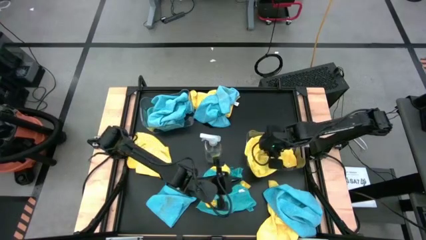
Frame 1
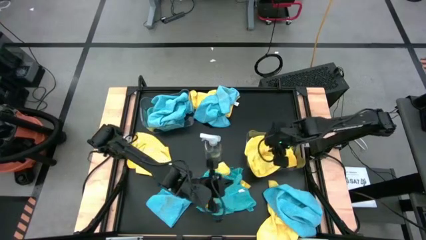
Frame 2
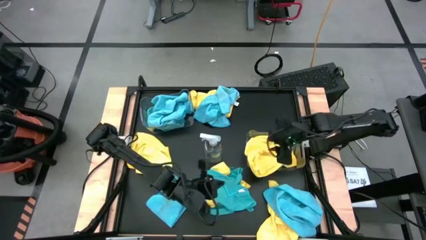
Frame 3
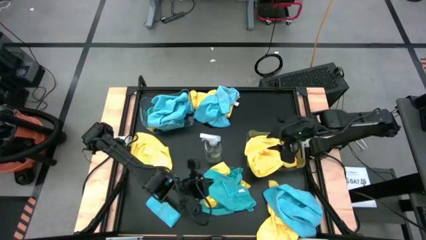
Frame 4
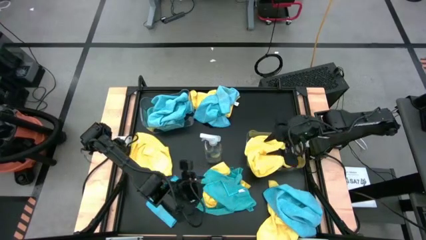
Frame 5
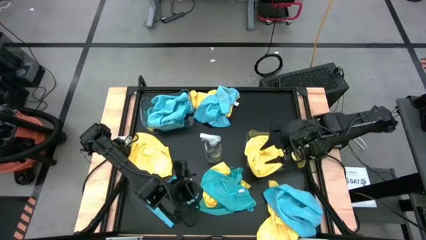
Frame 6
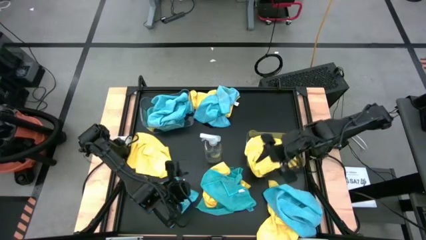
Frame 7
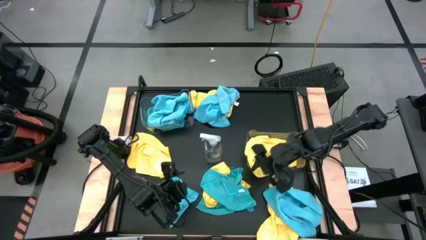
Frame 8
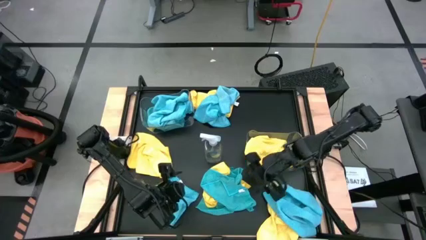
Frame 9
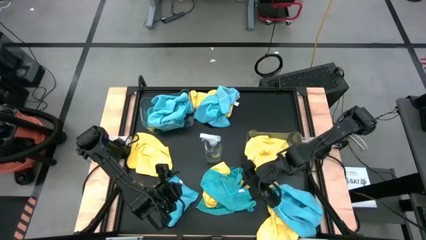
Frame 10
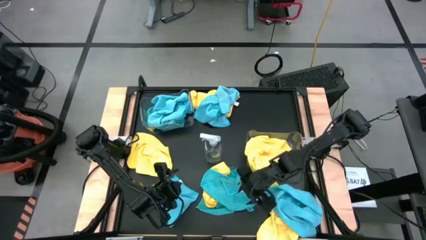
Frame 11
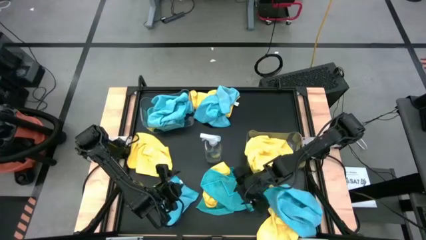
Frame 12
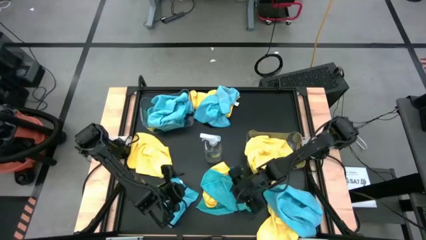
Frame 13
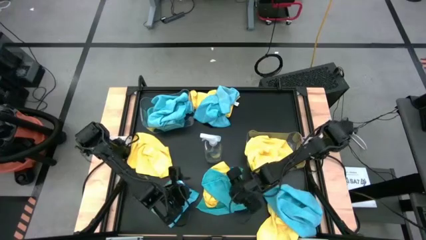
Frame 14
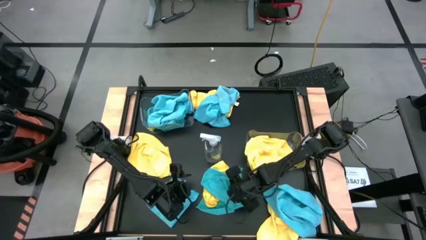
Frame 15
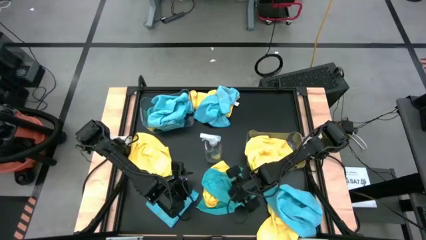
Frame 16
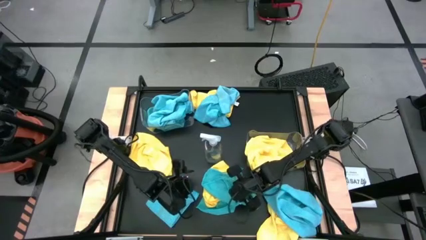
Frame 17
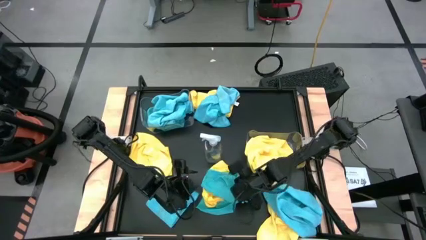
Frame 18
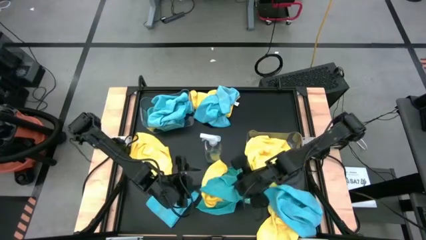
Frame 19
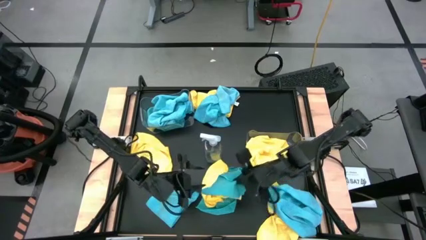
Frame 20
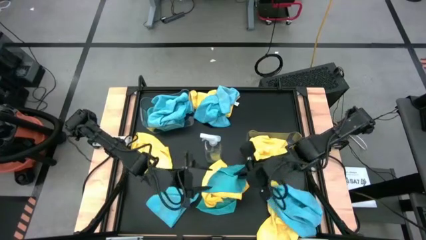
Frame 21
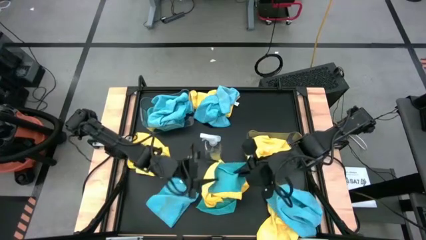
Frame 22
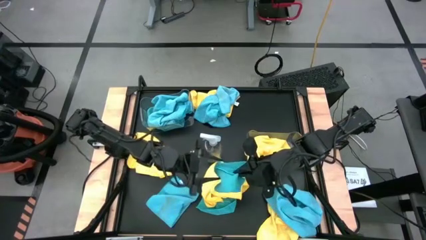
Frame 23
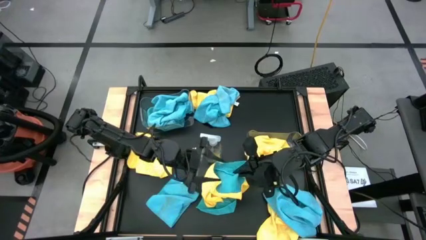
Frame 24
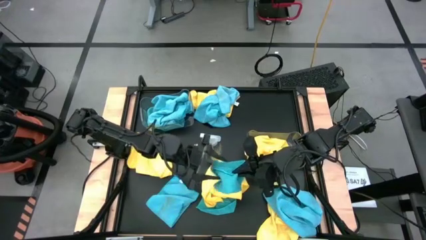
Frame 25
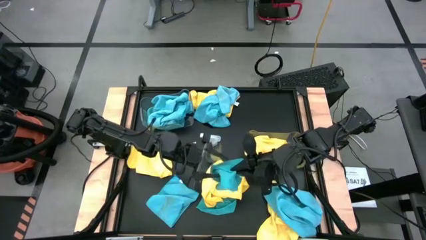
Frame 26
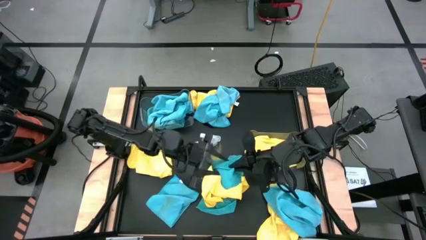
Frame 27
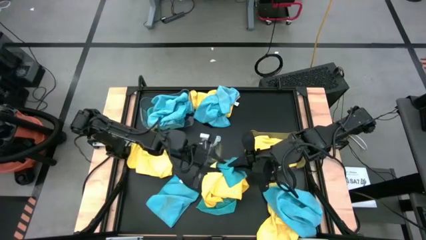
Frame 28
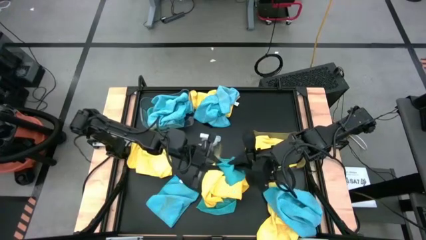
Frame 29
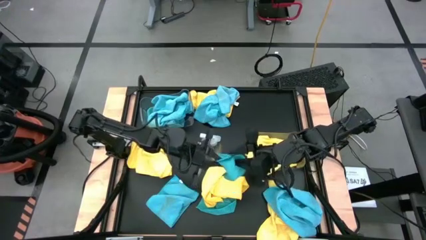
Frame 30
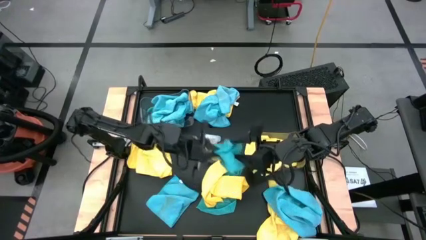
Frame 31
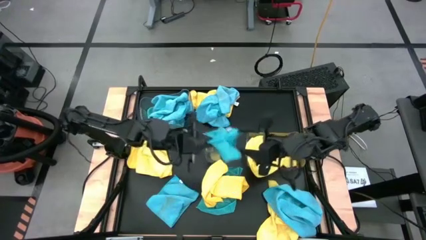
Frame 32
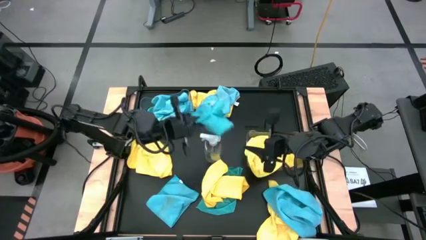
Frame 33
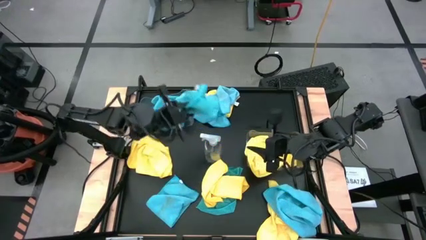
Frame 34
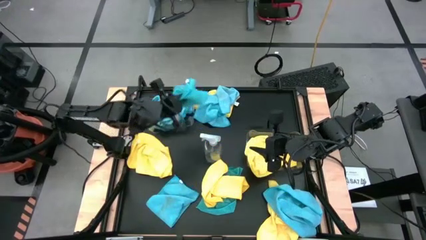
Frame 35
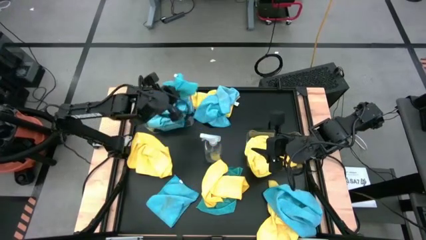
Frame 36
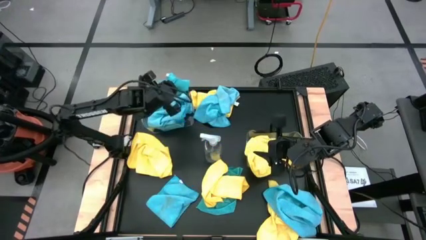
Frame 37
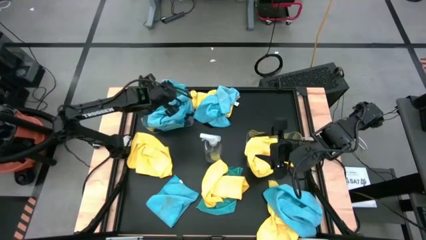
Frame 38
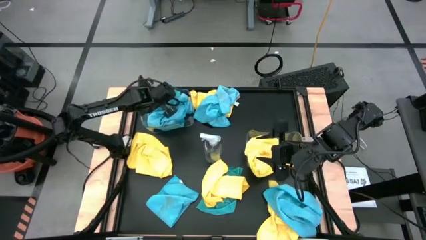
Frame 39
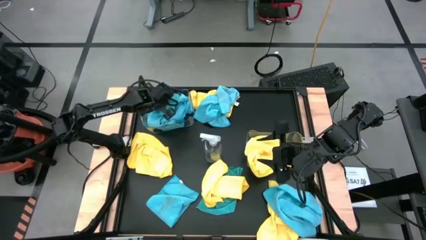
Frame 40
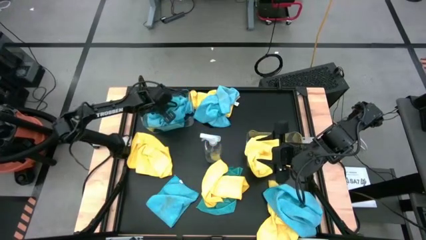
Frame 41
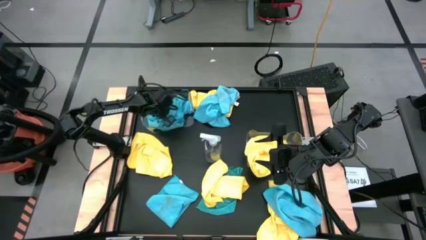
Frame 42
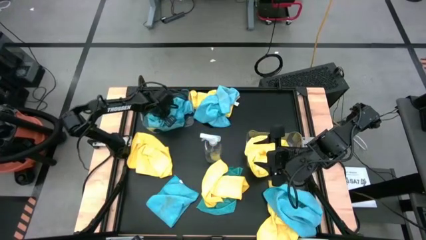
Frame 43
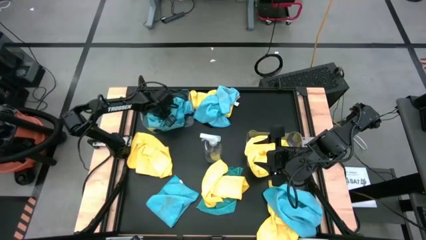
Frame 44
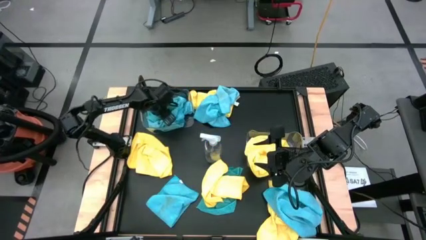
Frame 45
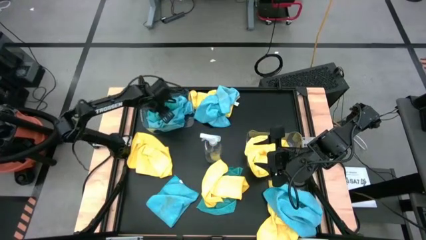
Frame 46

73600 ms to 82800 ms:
Task: Sort microfiber towel by color & place in baskets
Put the blue microfiber towel into the top transparent bin

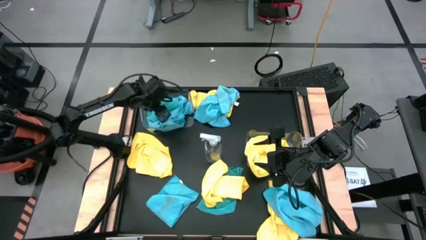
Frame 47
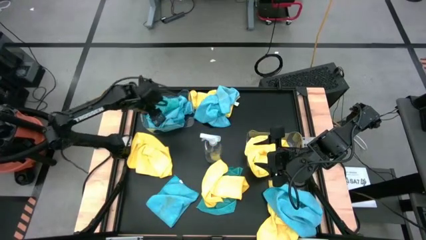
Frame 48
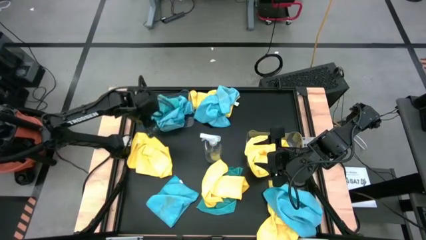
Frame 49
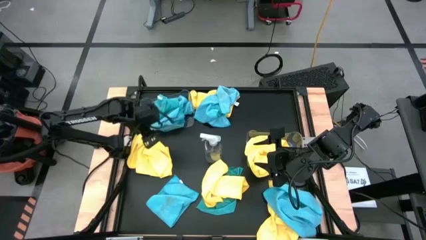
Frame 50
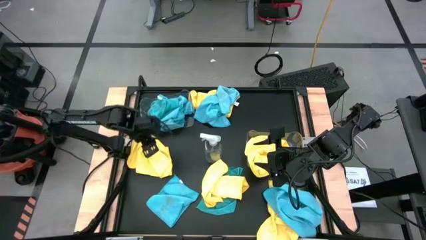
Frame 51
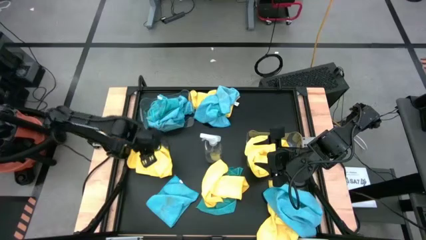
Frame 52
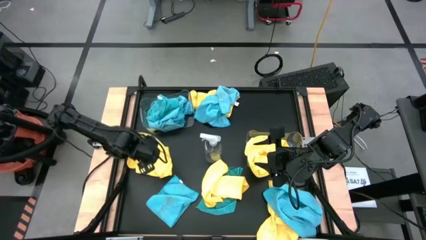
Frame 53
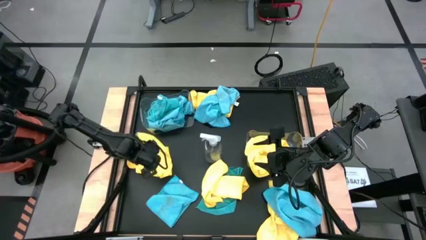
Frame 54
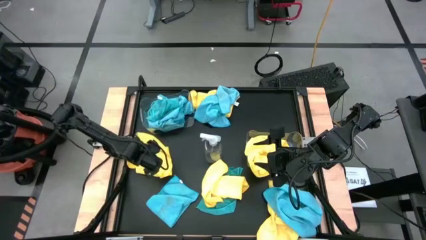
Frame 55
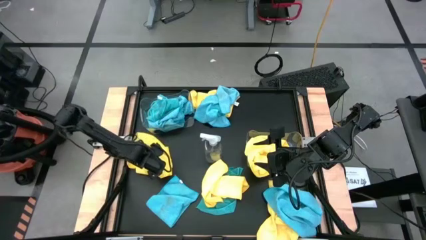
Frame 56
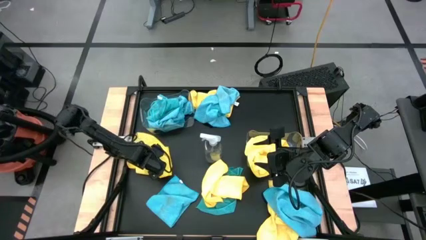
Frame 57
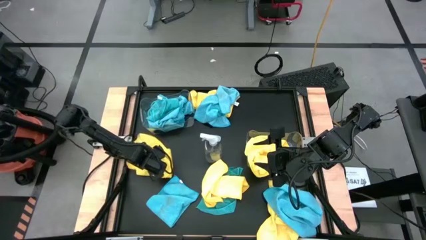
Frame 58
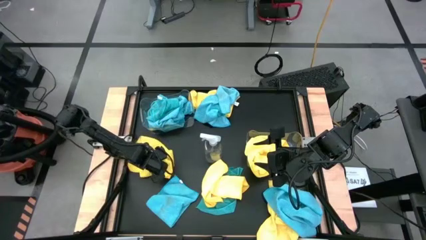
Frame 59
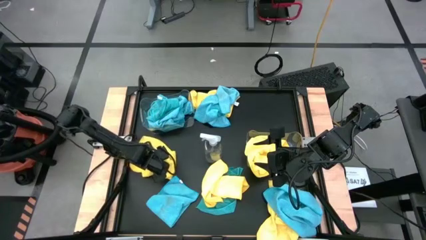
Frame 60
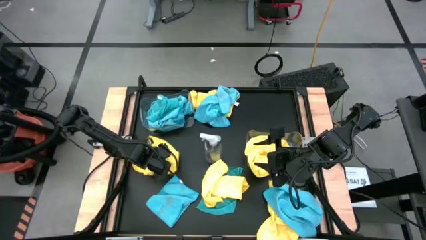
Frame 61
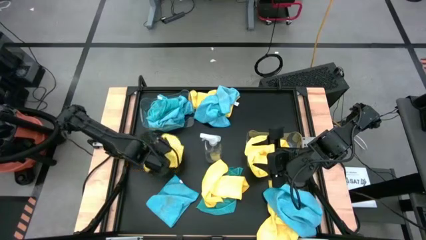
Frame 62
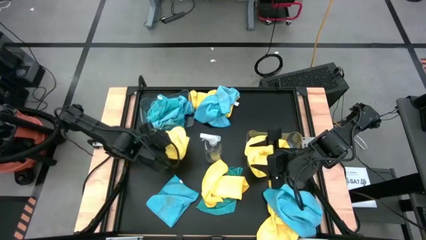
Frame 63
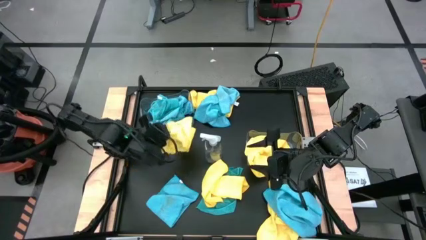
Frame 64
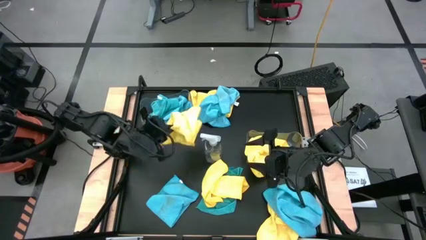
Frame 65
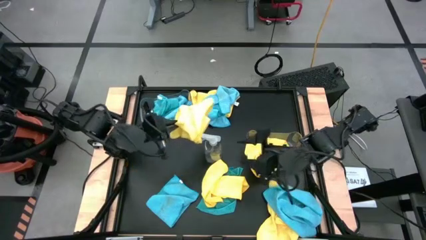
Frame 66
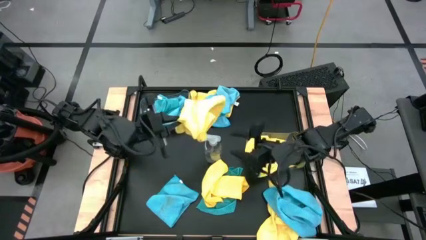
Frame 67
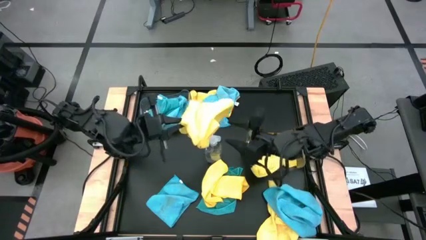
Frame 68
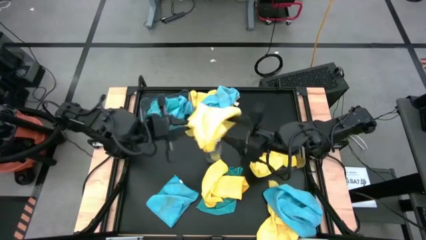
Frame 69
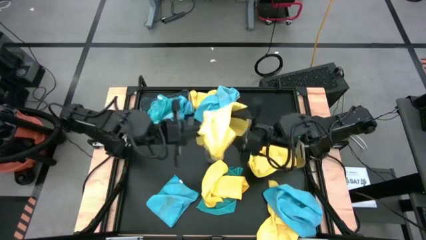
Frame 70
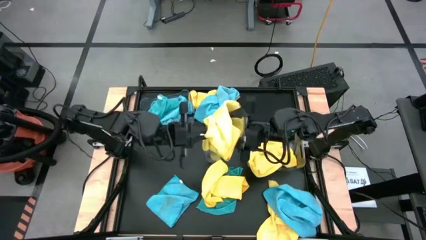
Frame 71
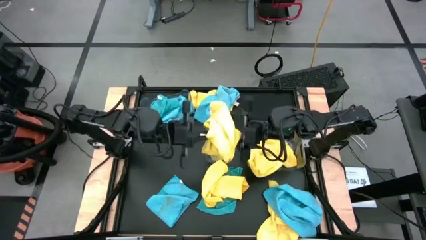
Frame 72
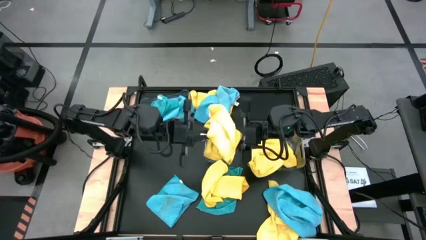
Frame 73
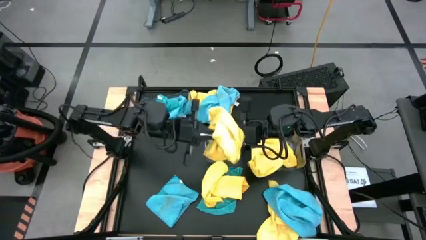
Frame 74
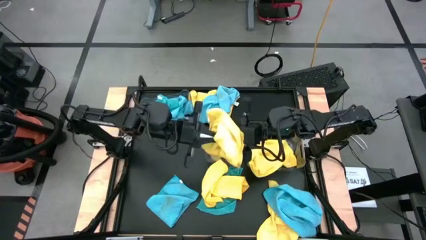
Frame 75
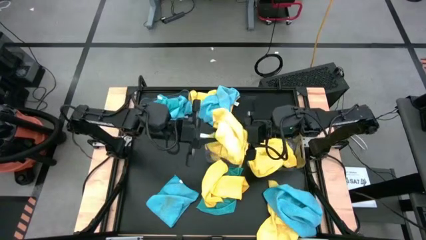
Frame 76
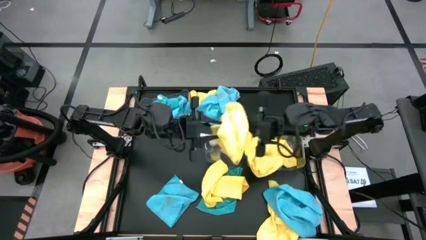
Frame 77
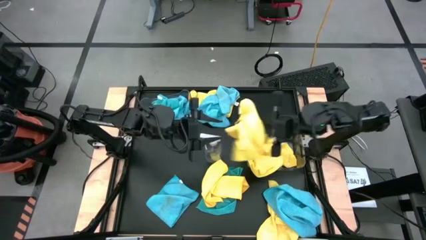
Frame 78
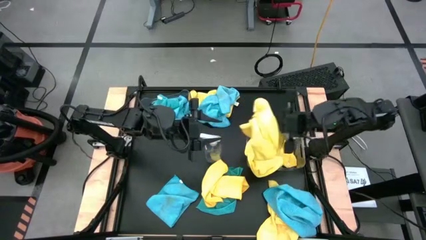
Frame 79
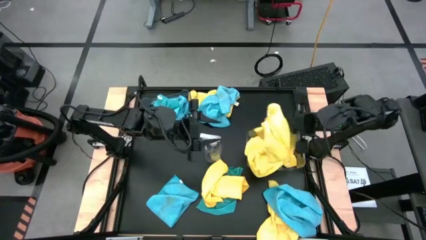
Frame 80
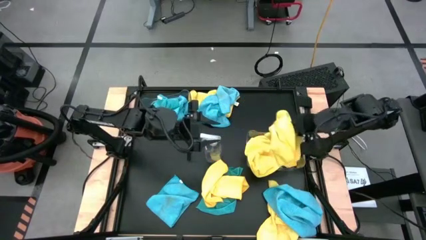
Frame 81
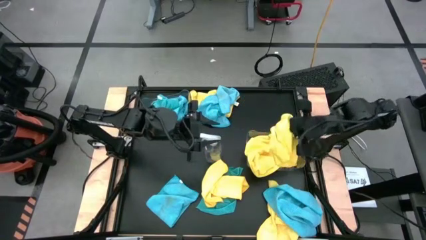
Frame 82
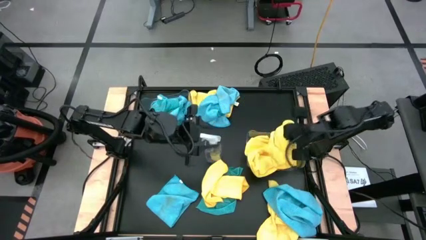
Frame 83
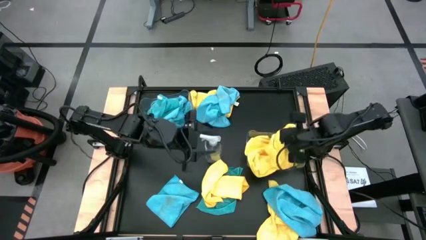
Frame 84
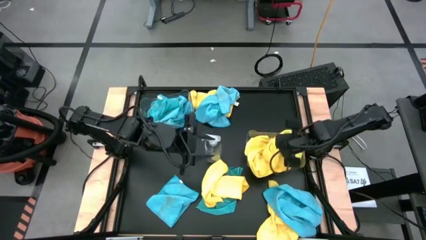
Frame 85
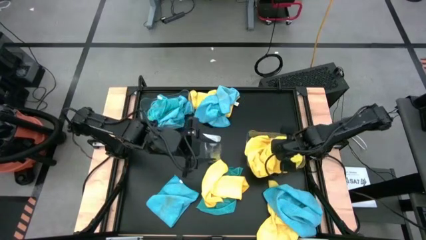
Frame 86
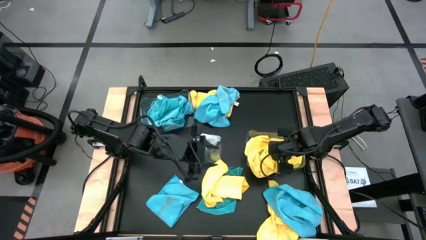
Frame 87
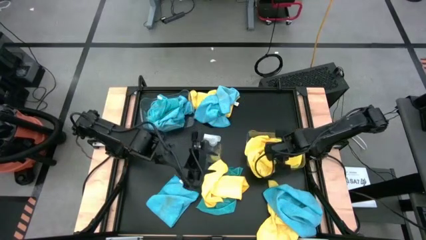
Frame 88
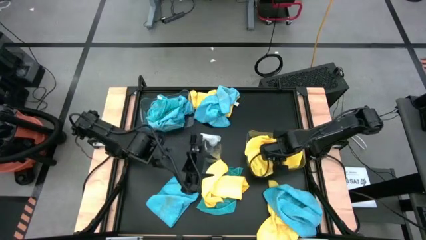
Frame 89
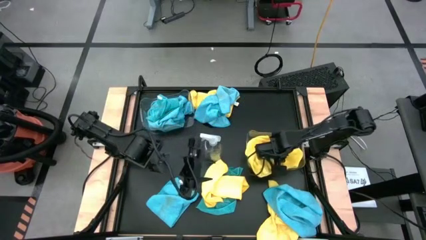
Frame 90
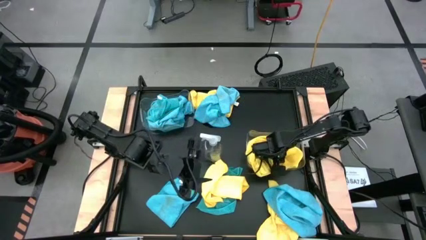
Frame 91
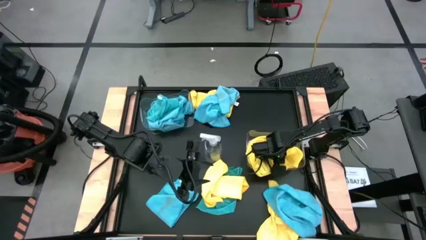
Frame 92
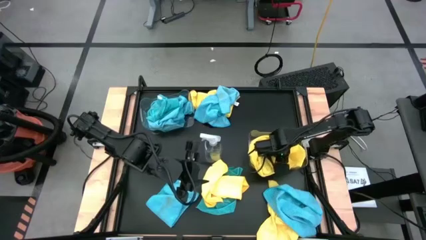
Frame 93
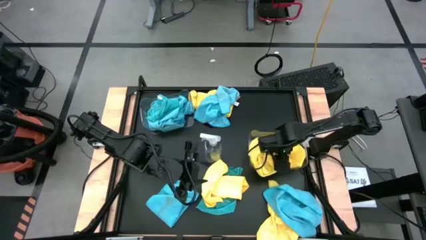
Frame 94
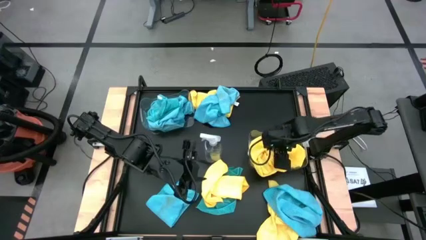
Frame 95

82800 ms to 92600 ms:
Put the yellow microfiber towel into the bottom transparent bin
